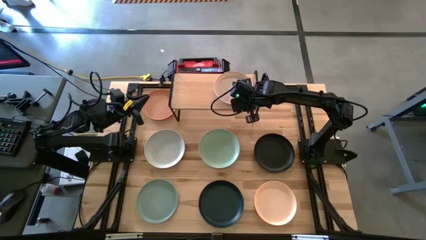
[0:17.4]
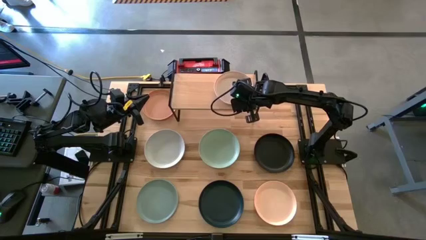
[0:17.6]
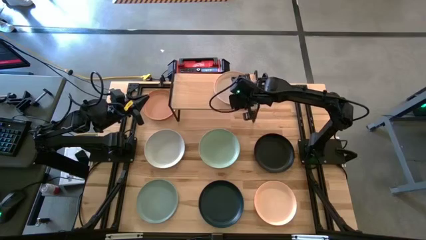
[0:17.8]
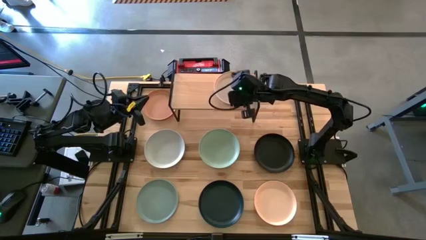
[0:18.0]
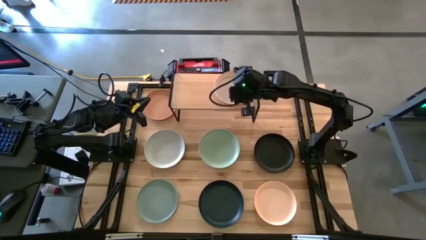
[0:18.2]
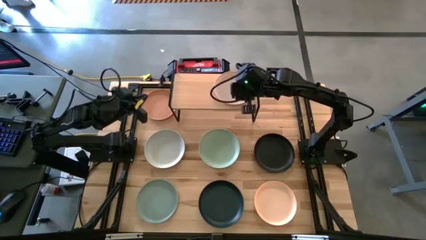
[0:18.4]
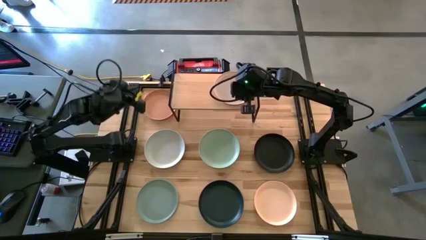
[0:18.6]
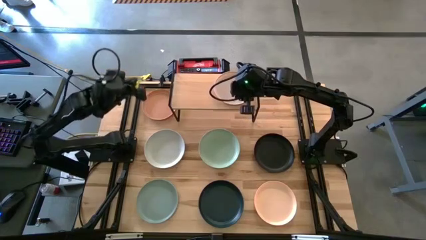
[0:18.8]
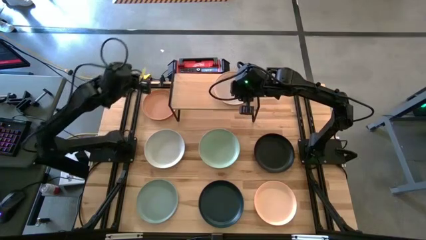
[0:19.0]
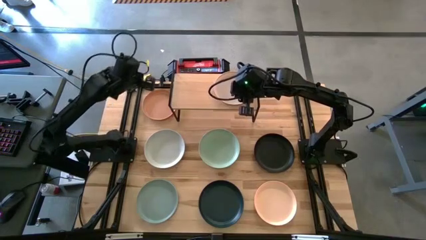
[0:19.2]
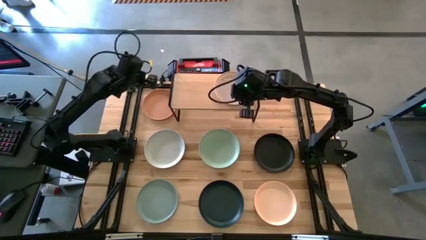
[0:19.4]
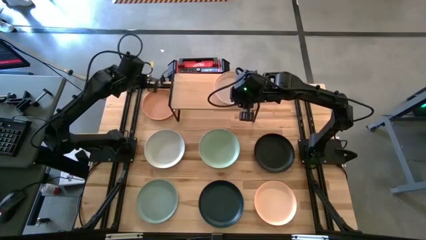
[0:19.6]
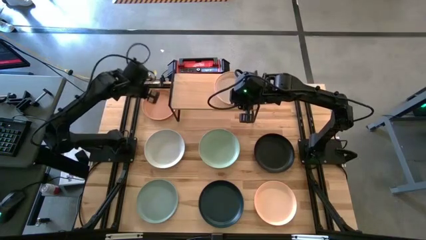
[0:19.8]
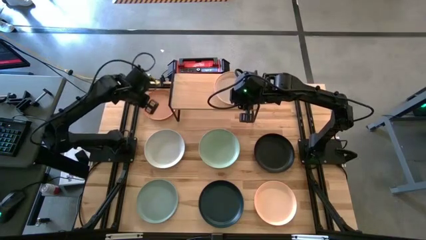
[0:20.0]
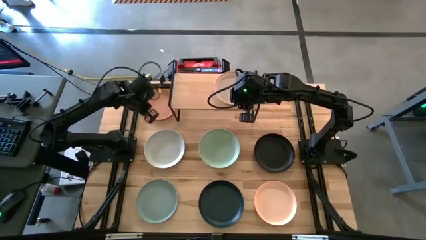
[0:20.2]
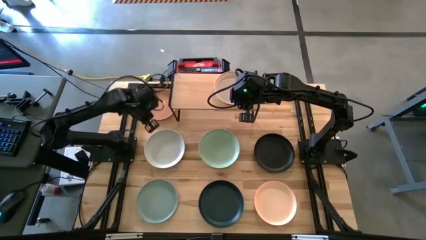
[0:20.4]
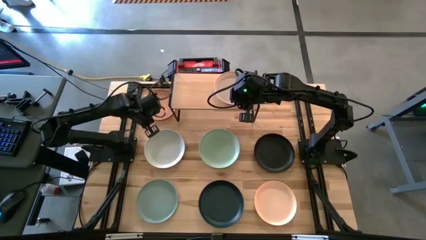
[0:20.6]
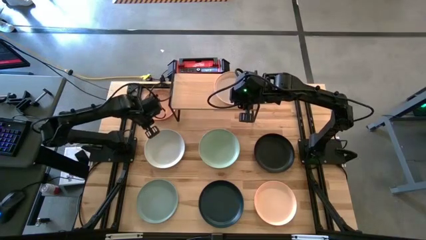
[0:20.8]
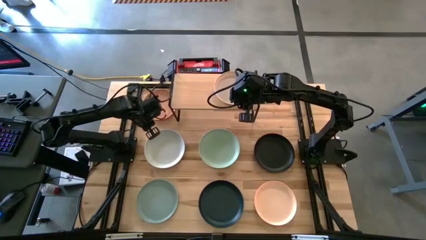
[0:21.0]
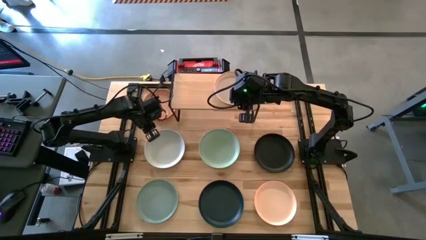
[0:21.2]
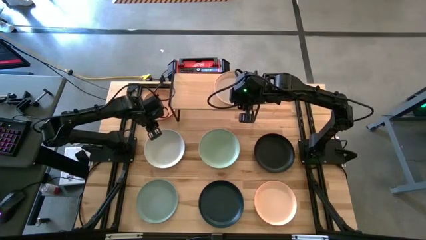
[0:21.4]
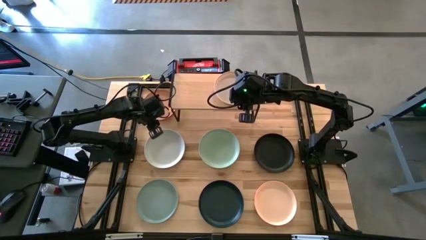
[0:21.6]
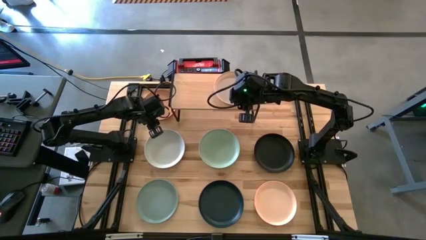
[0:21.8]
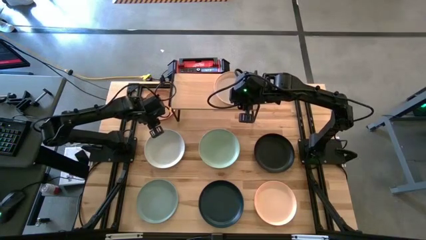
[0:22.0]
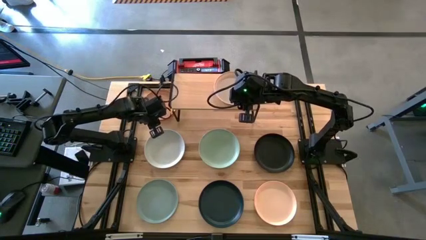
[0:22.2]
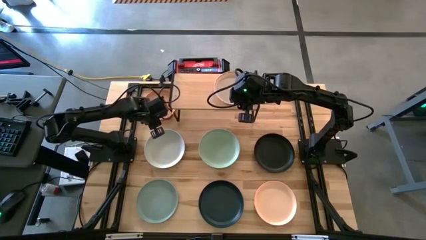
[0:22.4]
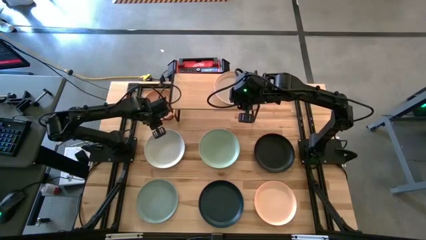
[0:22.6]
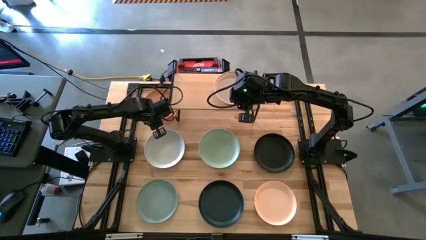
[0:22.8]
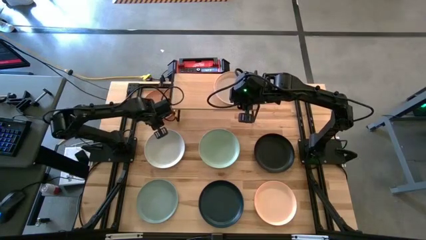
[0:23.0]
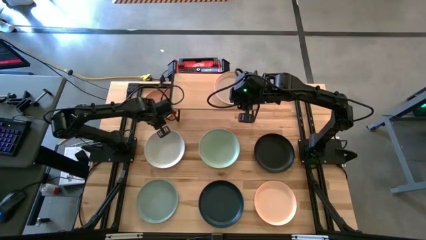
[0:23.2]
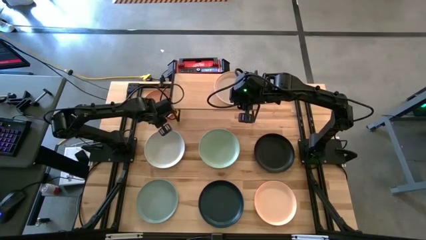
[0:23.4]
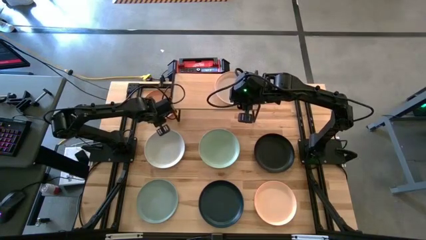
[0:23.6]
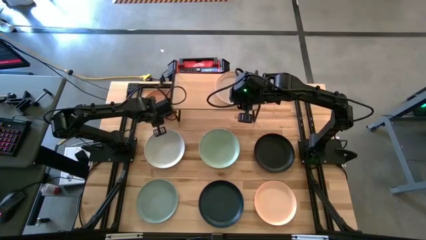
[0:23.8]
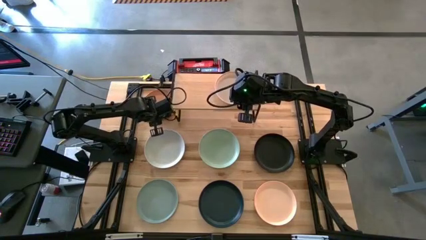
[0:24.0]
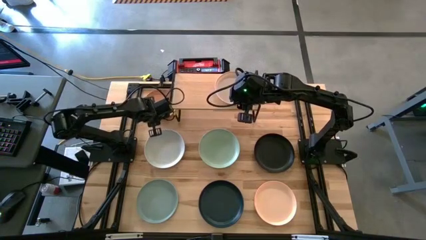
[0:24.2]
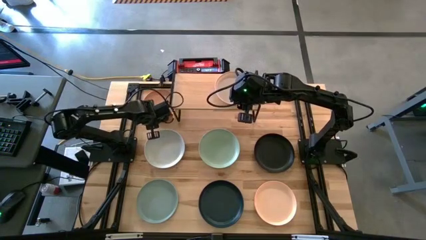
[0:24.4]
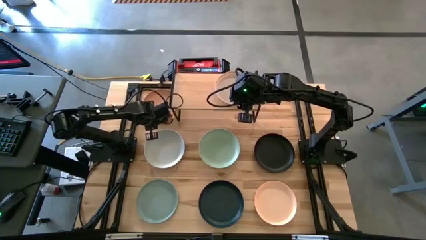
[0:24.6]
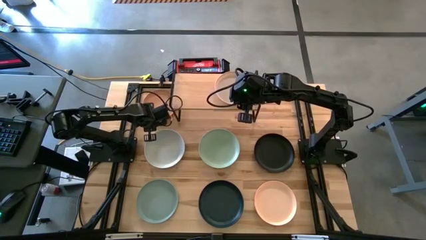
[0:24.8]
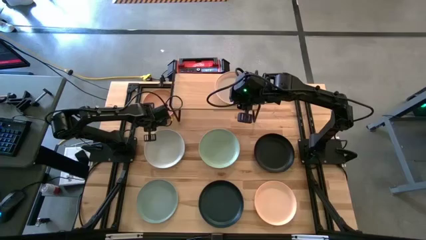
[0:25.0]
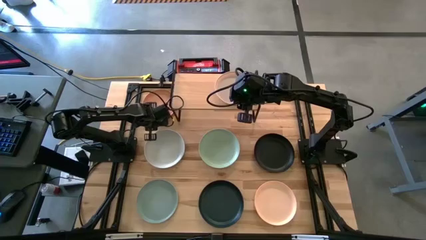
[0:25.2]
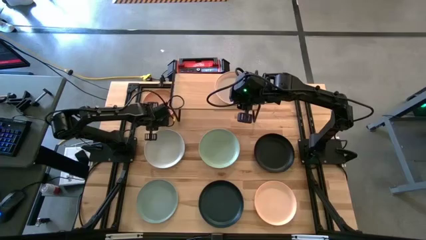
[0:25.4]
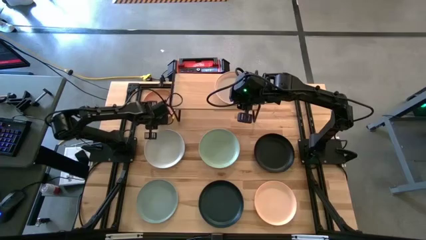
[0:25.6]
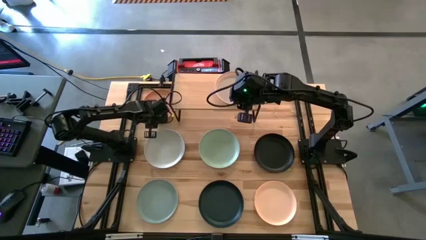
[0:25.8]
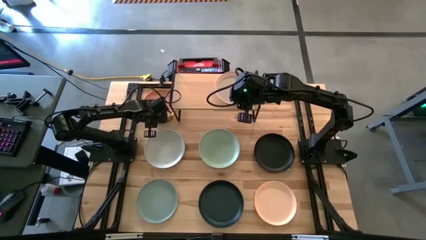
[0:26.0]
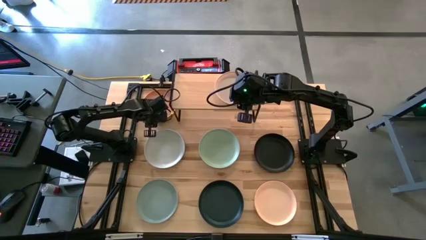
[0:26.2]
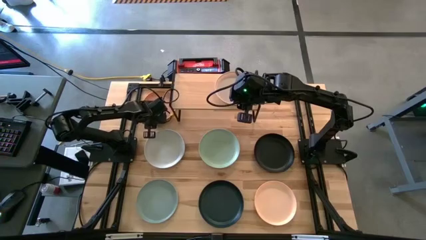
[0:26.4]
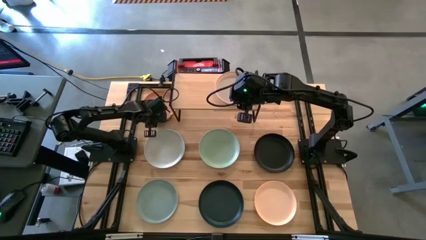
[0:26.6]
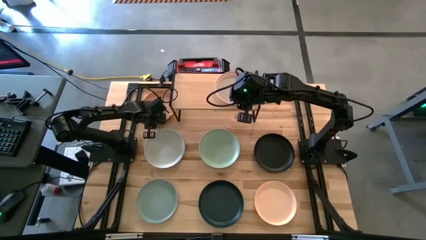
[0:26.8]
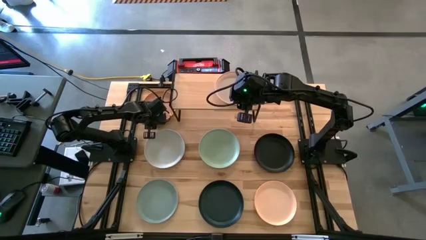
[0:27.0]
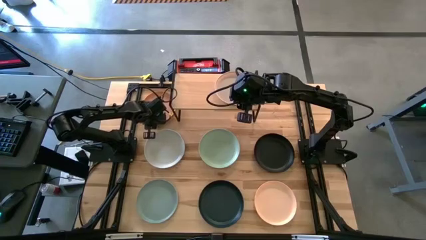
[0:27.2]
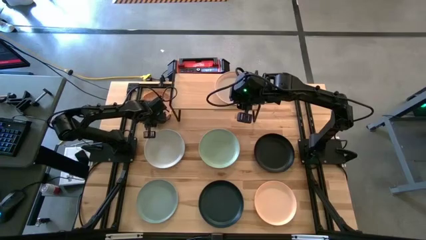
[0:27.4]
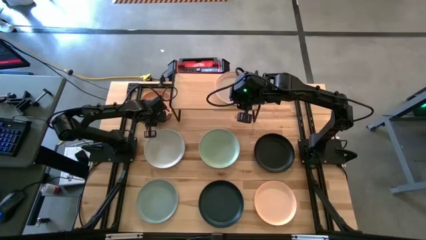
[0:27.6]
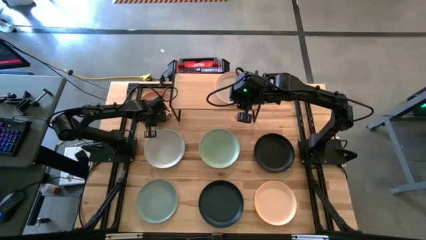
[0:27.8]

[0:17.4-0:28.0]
Task: Place and stack plates onto a shelf
Stack the orange plate on top of the light brown plate on the shelf
